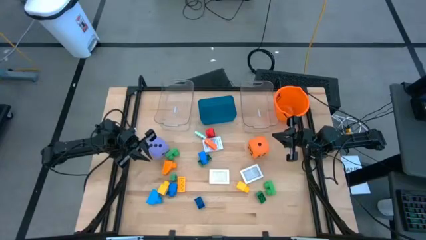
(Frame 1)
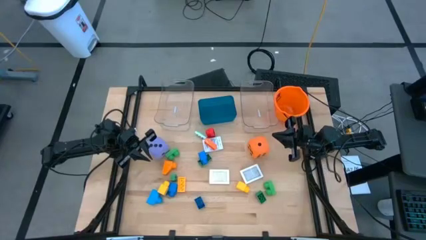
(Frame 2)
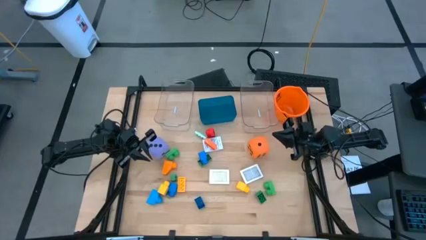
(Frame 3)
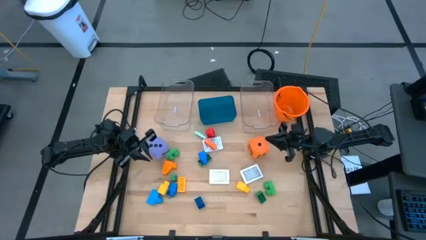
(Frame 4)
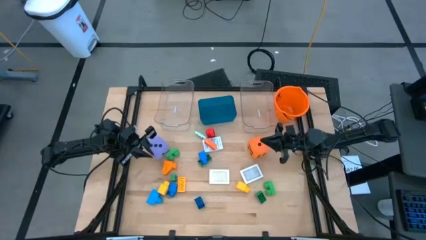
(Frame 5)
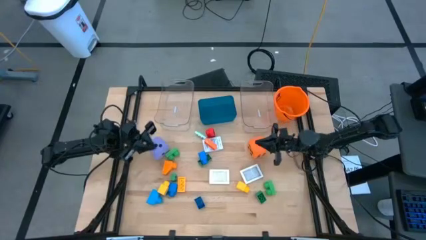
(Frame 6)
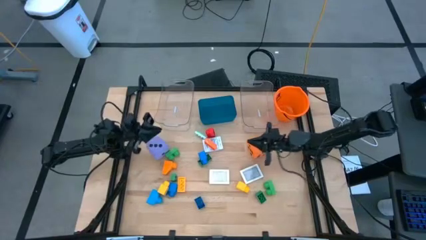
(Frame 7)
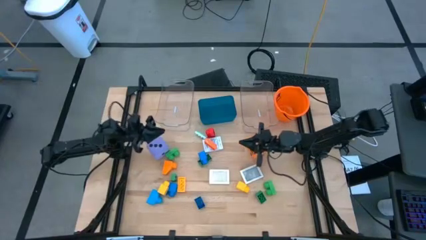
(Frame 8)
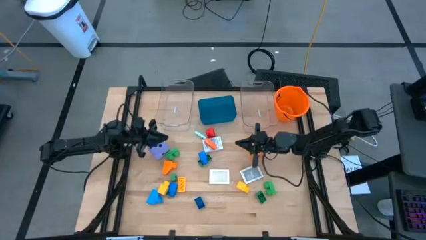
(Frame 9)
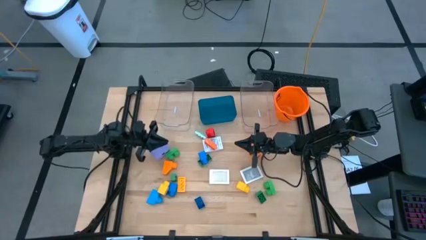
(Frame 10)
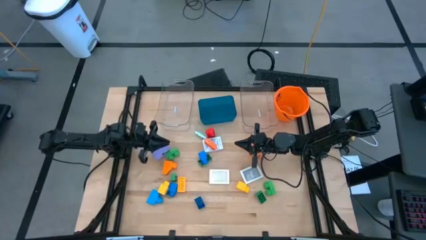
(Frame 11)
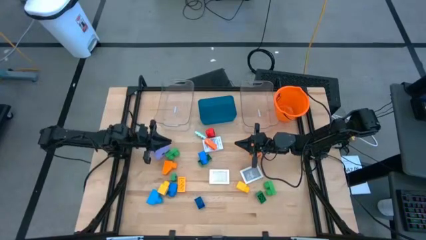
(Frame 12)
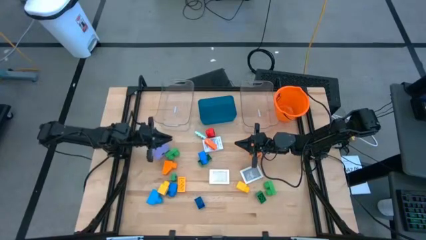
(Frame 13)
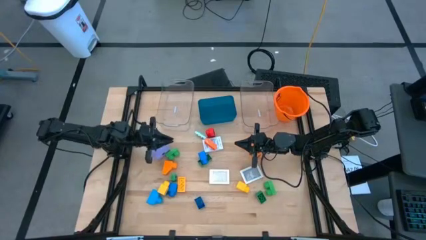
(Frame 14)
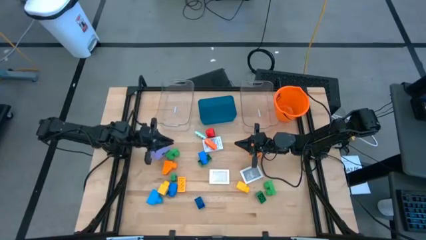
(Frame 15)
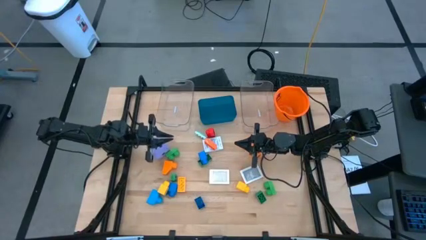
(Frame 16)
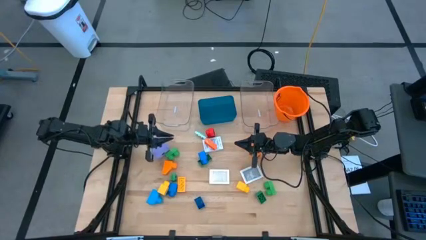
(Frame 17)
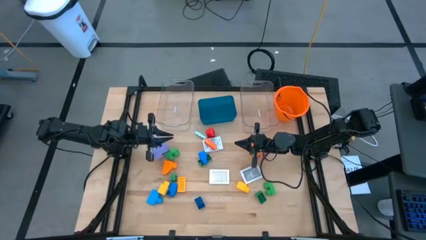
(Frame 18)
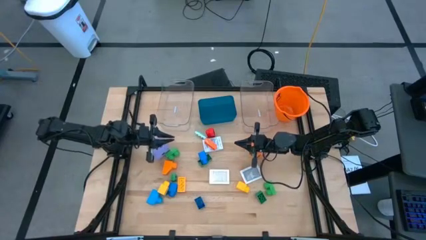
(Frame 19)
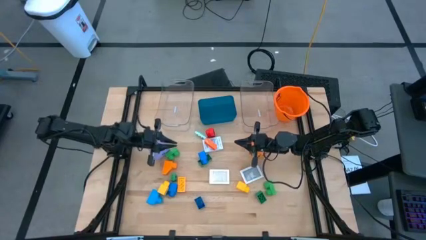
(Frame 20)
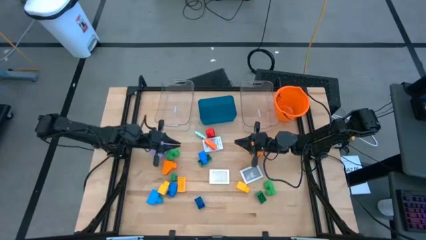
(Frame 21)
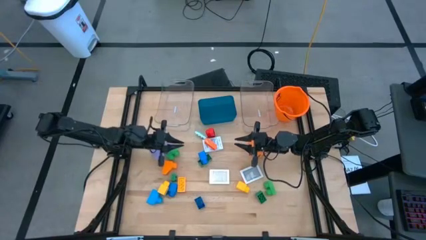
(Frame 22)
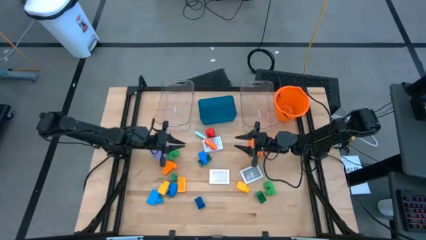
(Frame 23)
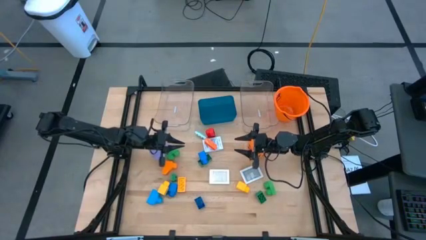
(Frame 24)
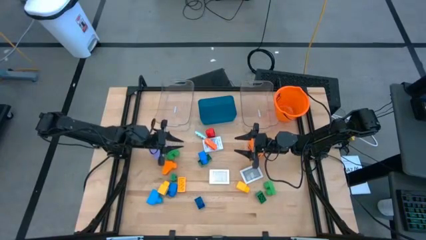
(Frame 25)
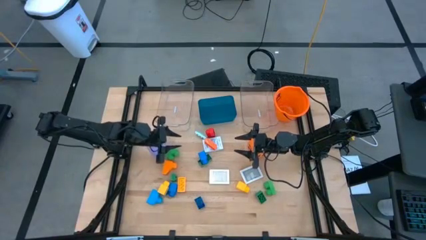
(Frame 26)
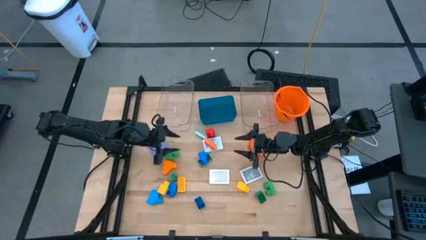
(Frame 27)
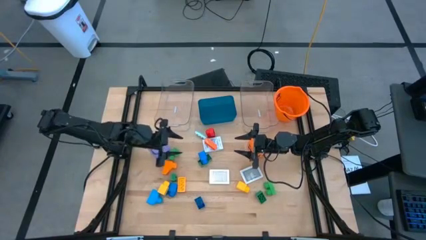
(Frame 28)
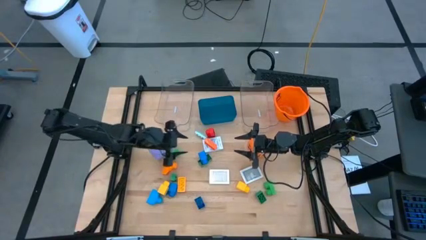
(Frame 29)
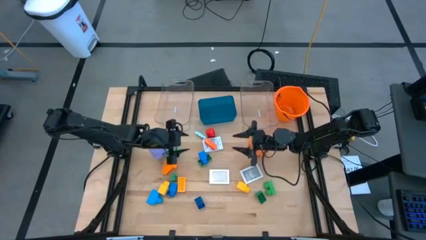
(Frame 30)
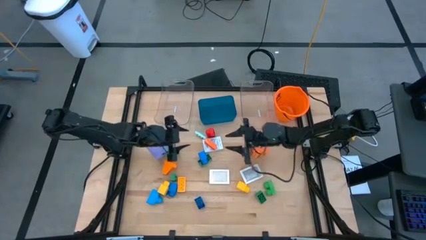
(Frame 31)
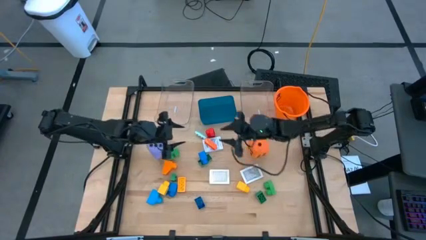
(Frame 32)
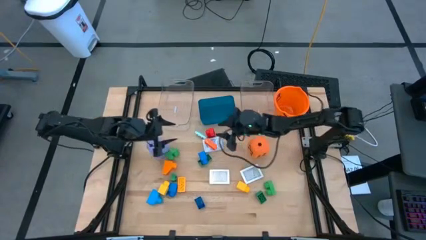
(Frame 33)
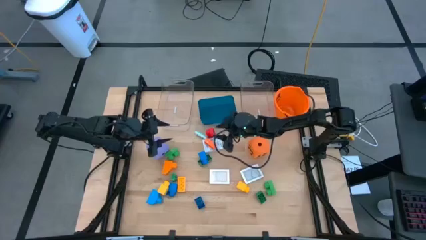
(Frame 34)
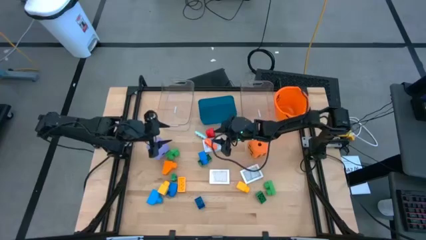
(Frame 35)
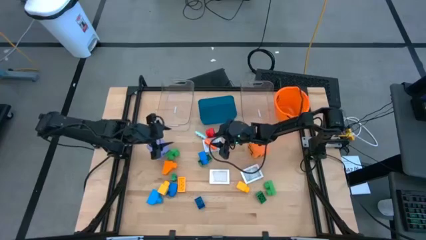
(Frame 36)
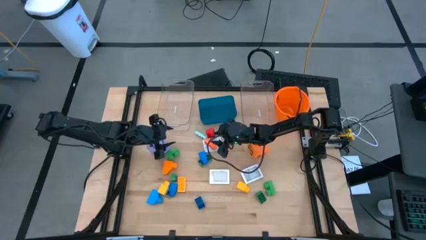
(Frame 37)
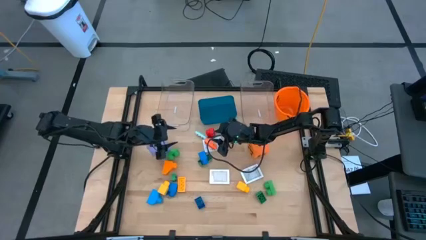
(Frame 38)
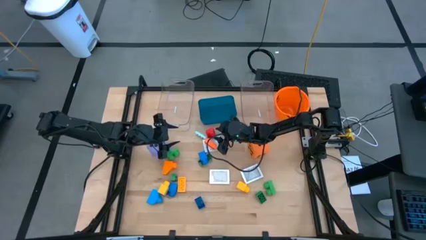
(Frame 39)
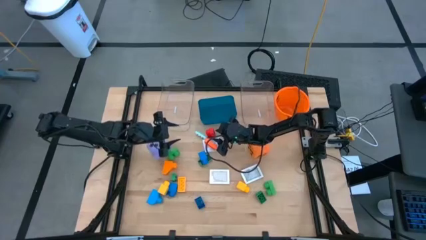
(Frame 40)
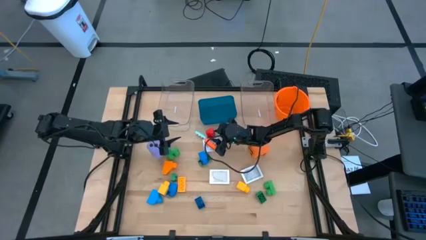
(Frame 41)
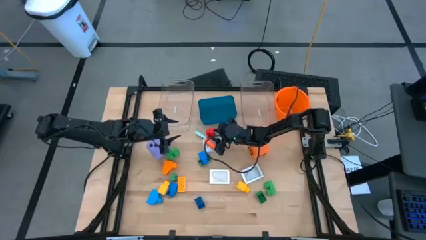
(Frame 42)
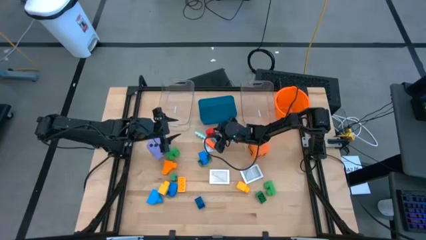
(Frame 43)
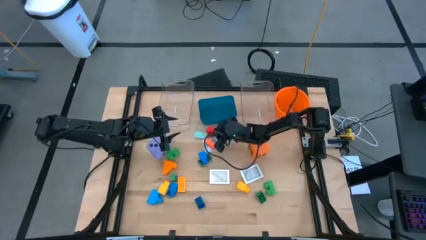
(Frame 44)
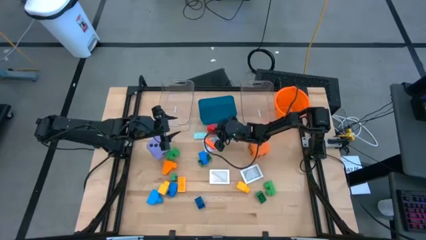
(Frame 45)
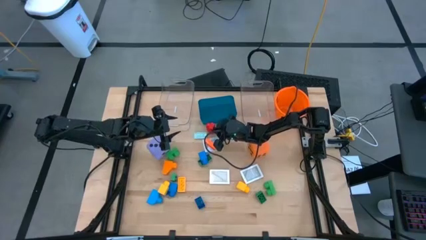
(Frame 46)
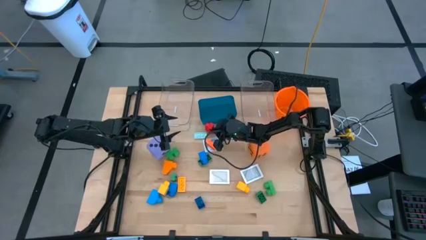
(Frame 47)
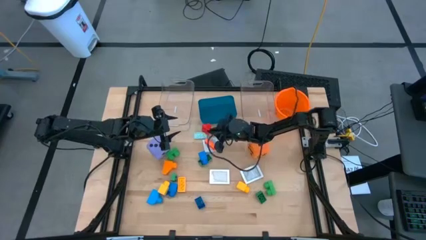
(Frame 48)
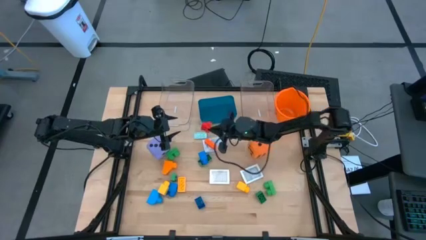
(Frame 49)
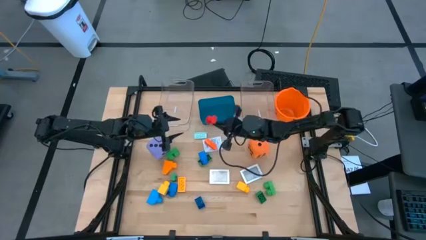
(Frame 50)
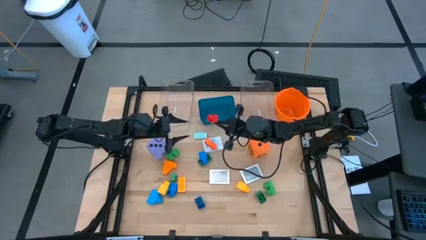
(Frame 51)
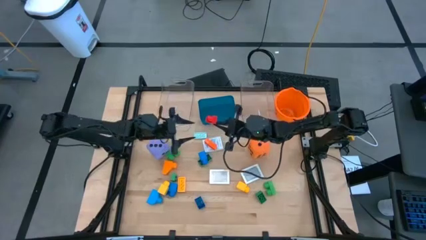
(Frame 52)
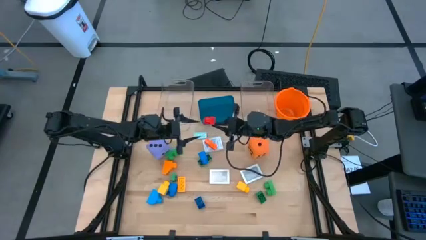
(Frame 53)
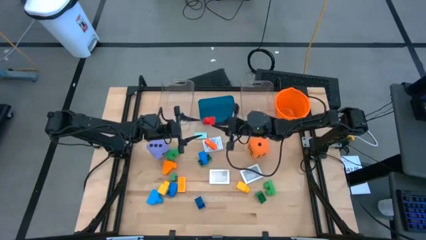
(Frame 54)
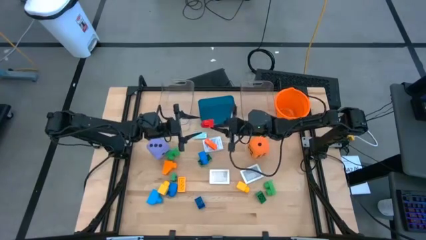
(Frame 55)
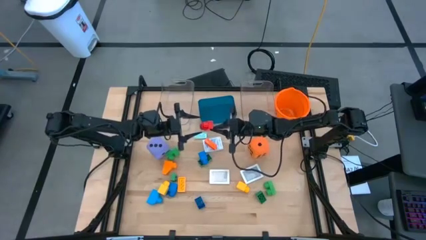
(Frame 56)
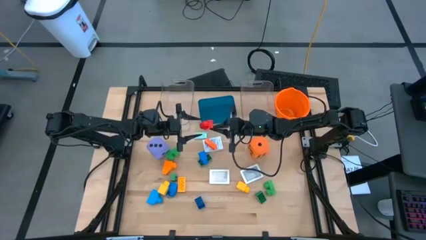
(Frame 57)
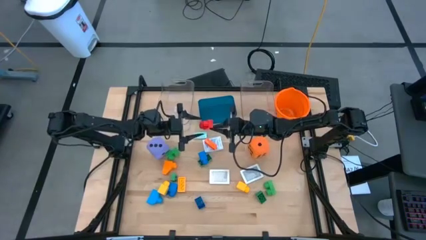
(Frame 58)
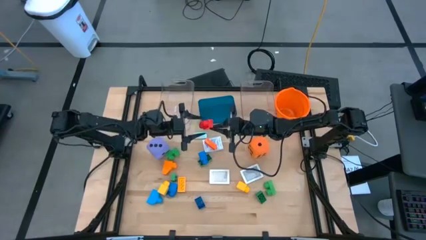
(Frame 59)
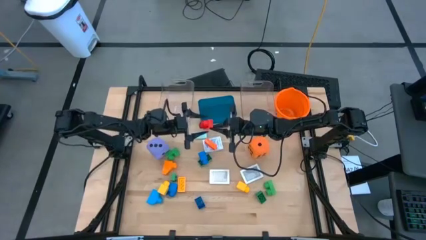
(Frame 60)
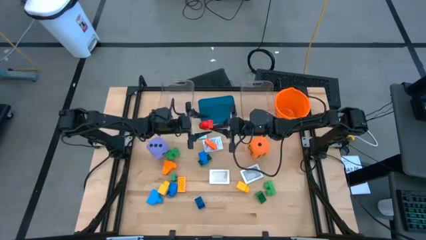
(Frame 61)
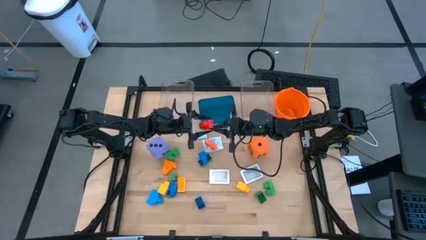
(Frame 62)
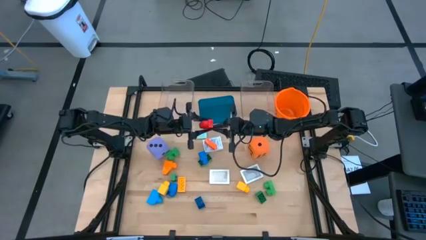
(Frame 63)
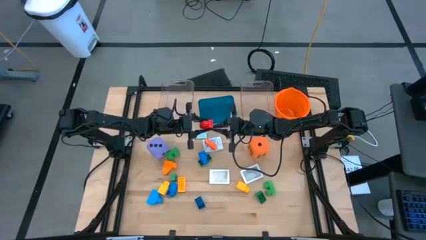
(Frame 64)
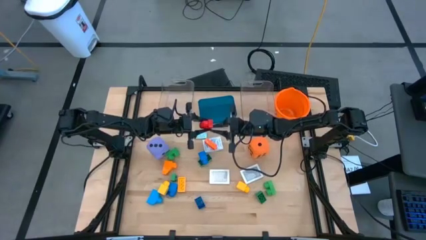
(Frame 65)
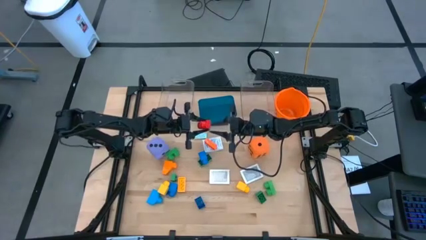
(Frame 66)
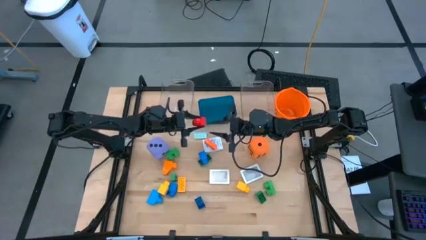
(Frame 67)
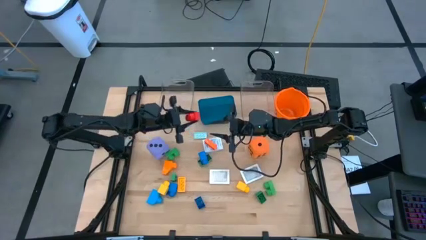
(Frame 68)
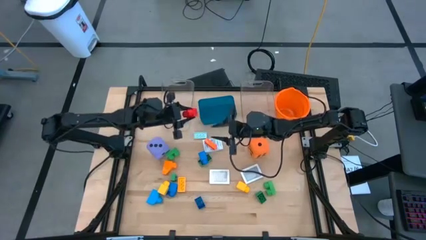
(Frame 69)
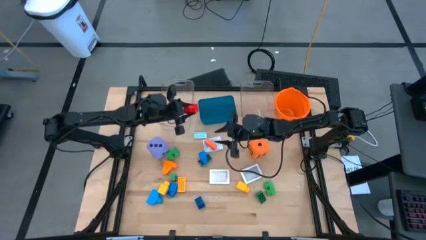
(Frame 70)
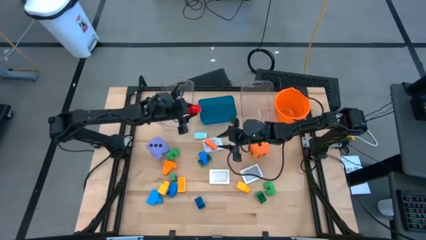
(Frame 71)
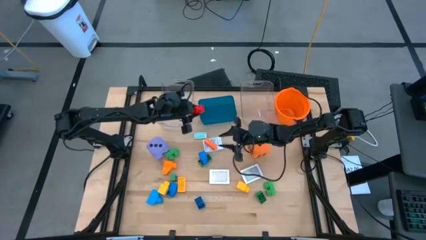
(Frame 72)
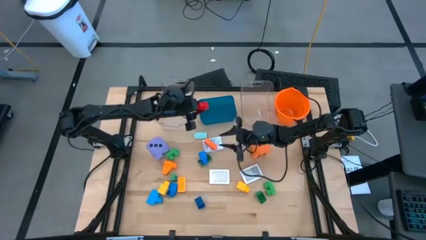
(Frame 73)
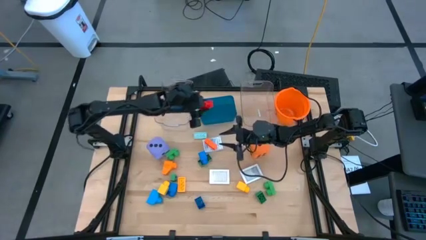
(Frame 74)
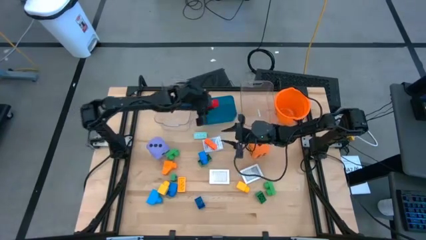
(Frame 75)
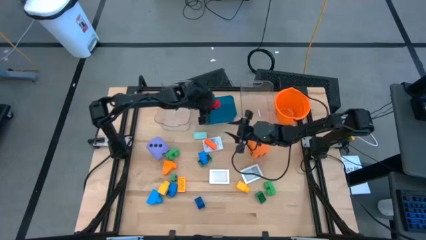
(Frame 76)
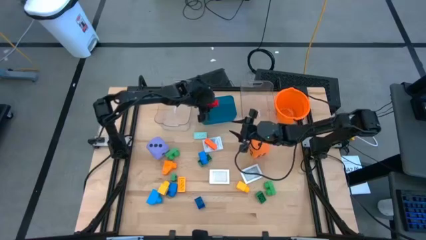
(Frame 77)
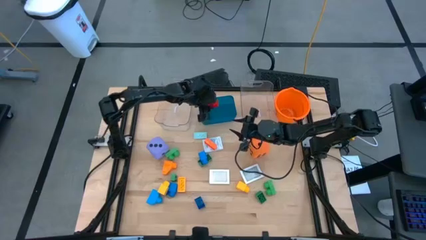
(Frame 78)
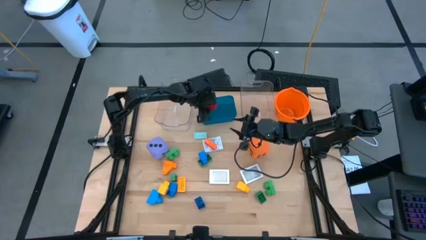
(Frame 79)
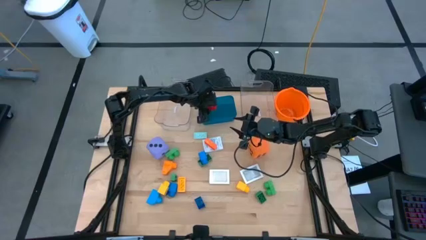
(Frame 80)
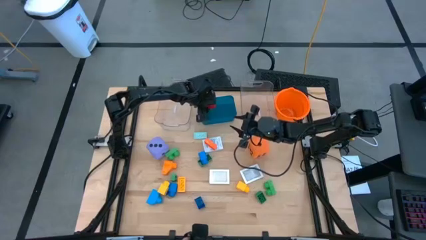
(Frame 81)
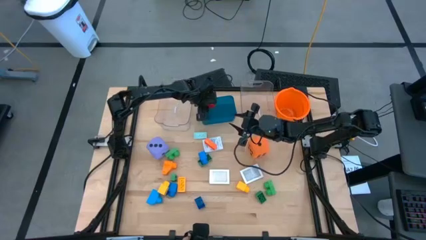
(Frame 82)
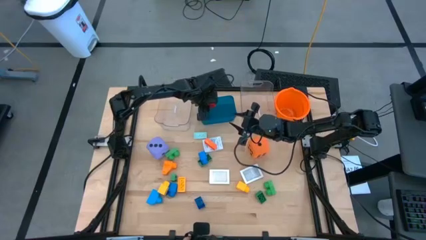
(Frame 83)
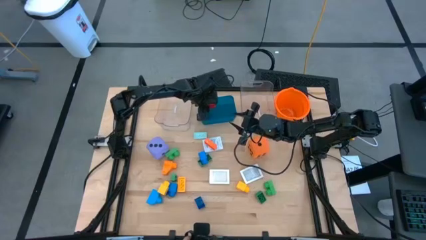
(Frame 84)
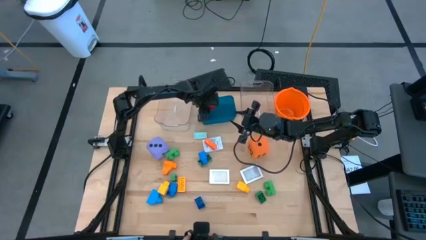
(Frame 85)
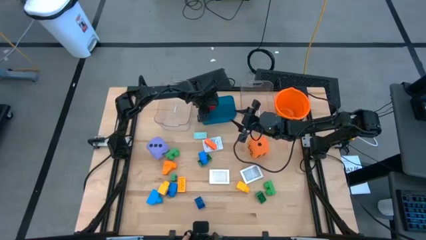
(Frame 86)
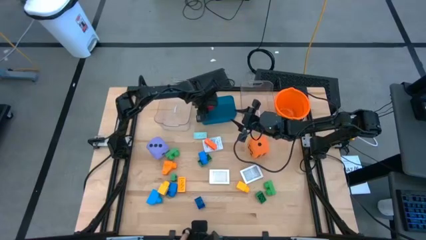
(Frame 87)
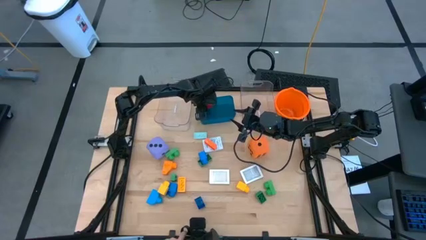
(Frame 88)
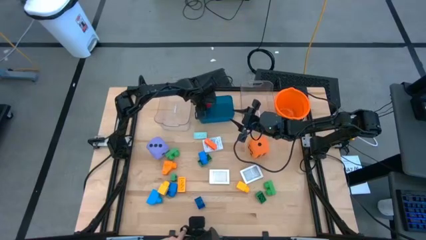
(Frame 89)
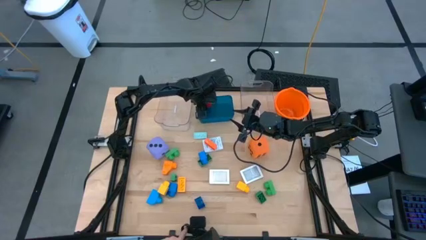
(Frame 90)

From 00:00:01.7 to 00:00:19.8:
Task: Pick & Place Toys
Put the red game piece into the blue bin
